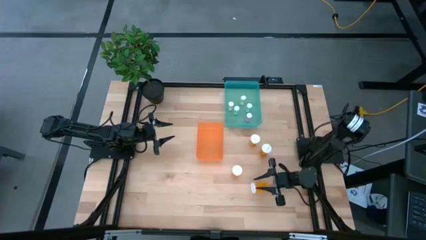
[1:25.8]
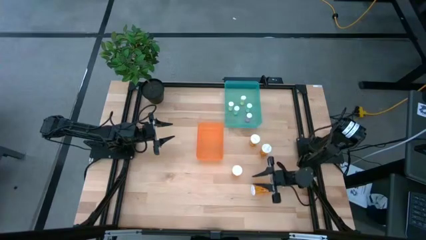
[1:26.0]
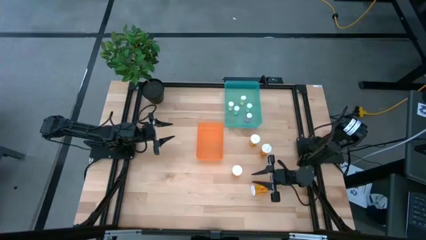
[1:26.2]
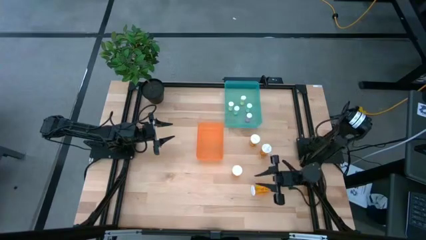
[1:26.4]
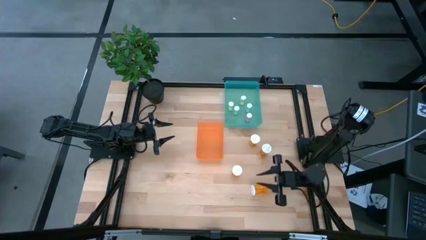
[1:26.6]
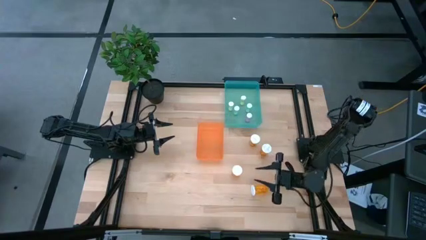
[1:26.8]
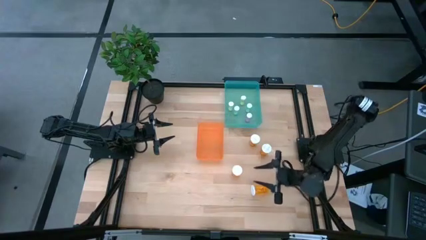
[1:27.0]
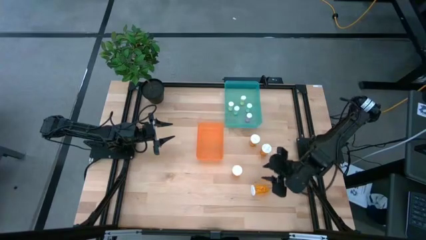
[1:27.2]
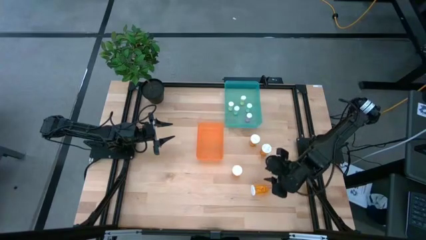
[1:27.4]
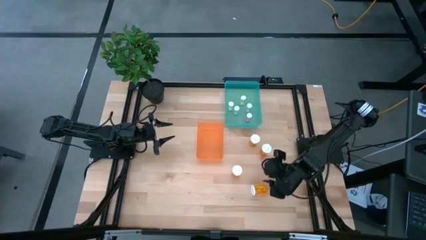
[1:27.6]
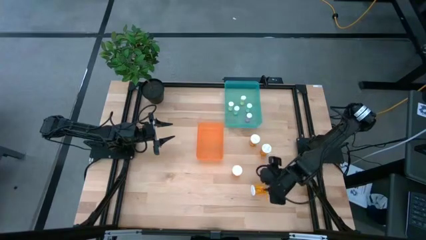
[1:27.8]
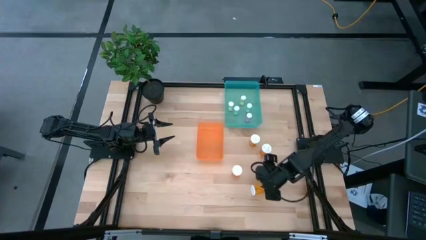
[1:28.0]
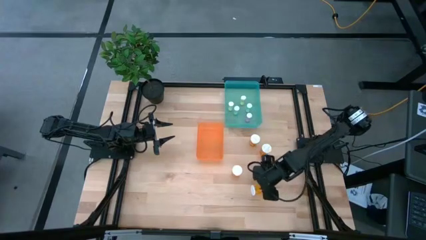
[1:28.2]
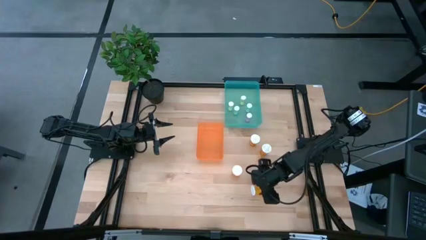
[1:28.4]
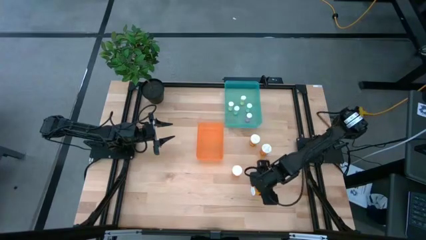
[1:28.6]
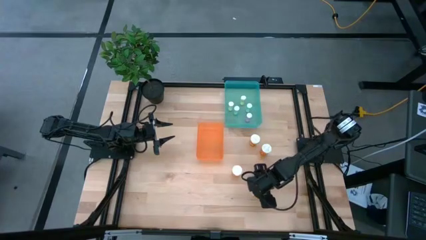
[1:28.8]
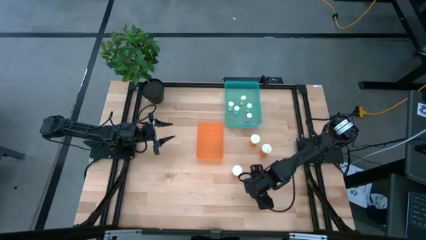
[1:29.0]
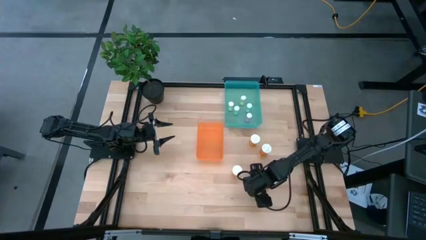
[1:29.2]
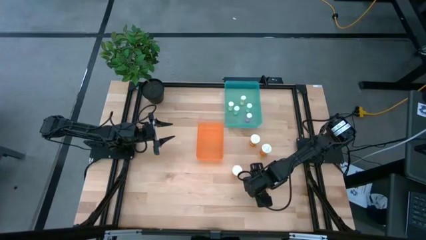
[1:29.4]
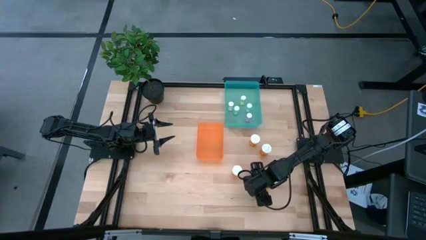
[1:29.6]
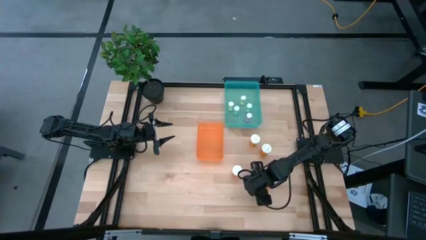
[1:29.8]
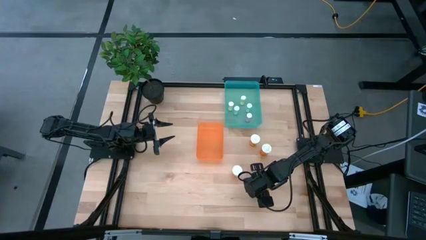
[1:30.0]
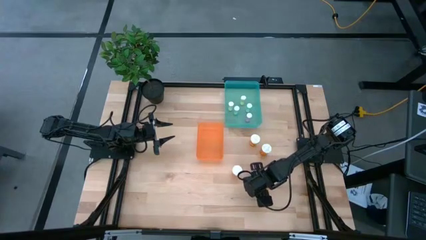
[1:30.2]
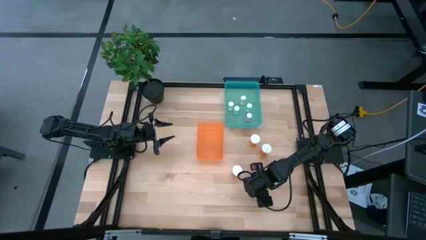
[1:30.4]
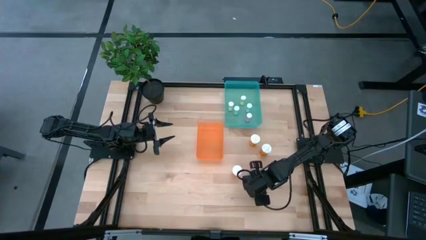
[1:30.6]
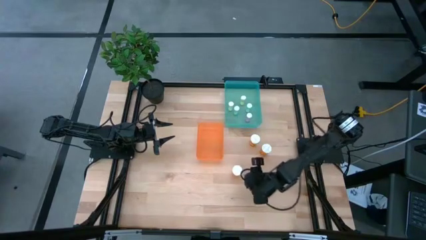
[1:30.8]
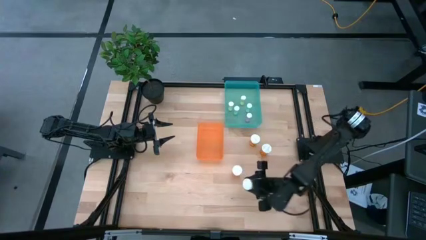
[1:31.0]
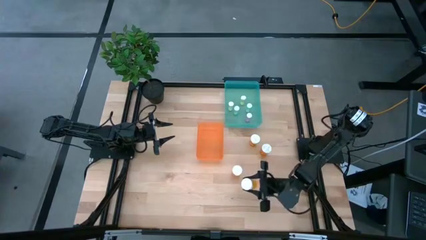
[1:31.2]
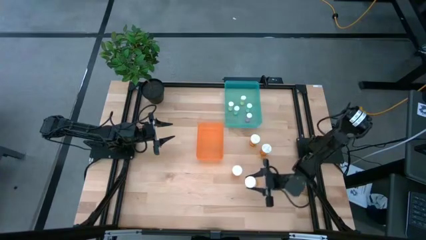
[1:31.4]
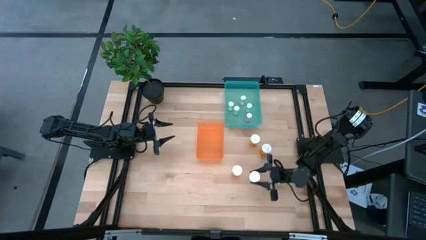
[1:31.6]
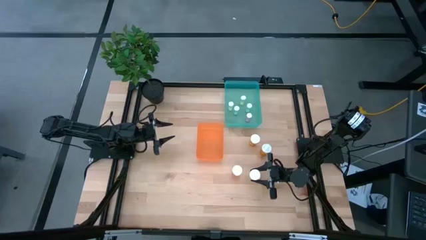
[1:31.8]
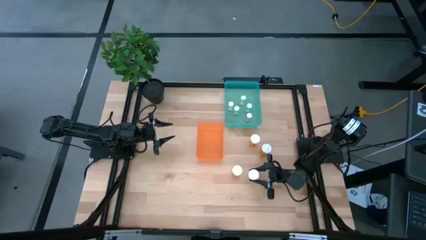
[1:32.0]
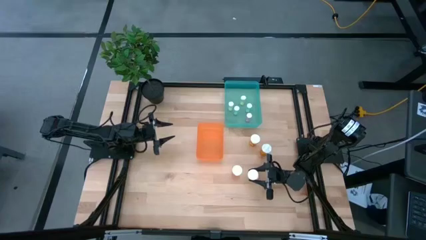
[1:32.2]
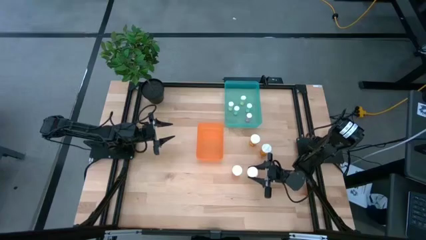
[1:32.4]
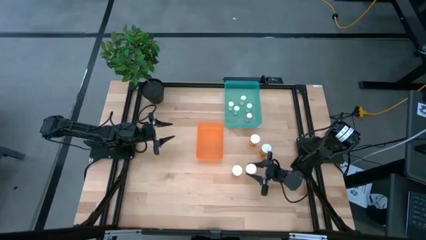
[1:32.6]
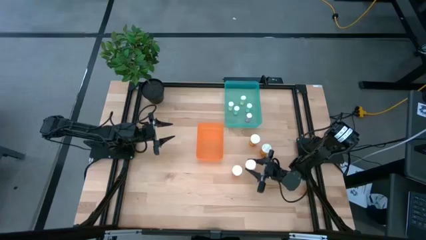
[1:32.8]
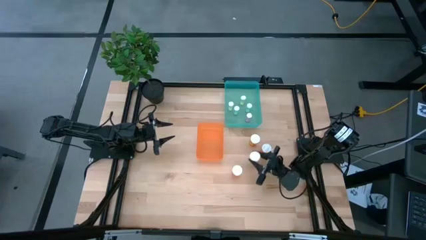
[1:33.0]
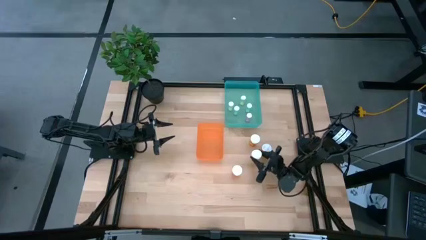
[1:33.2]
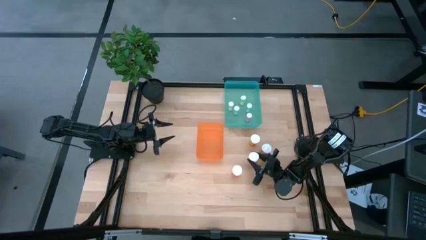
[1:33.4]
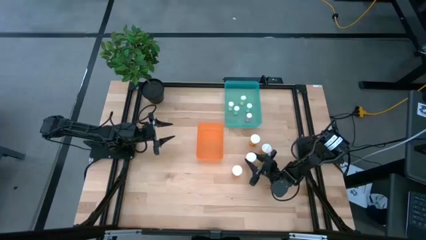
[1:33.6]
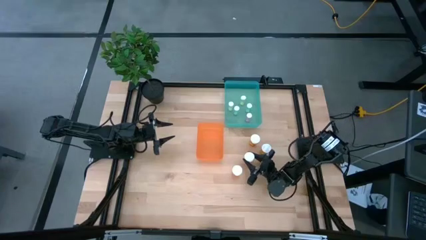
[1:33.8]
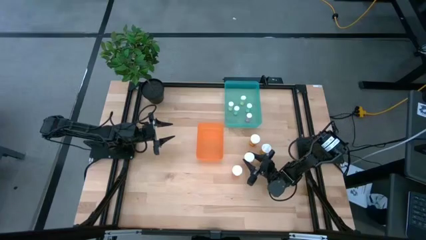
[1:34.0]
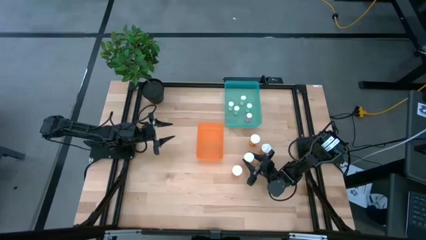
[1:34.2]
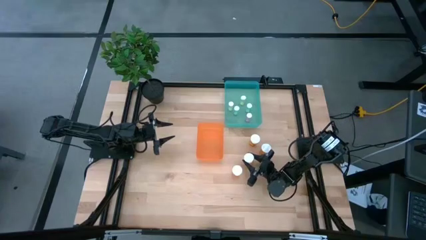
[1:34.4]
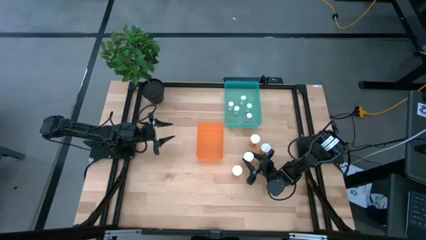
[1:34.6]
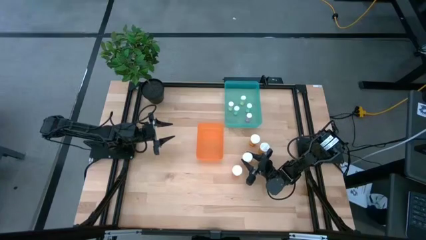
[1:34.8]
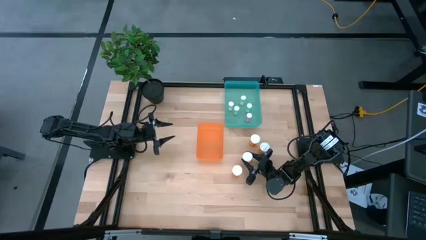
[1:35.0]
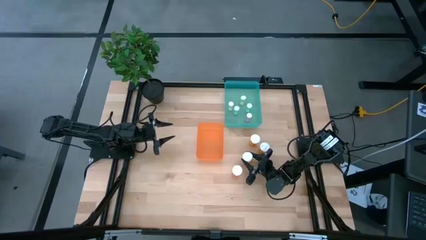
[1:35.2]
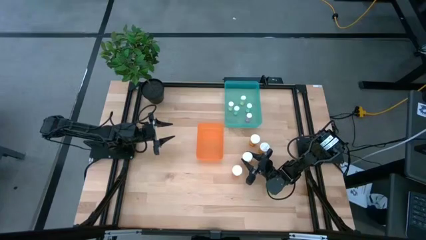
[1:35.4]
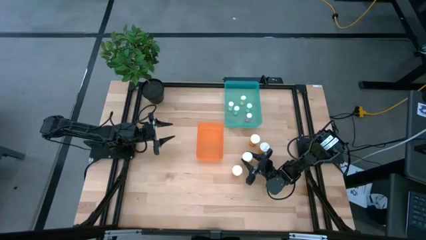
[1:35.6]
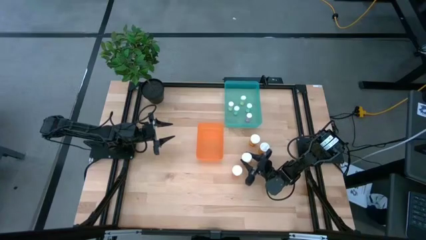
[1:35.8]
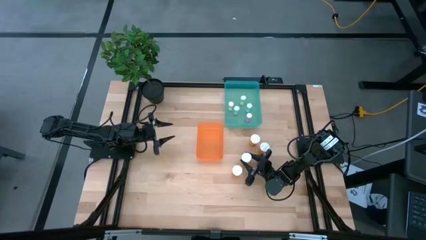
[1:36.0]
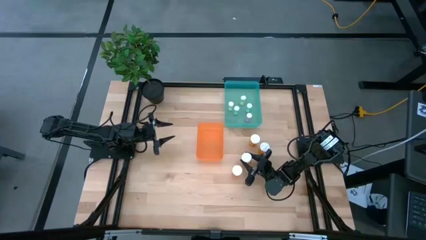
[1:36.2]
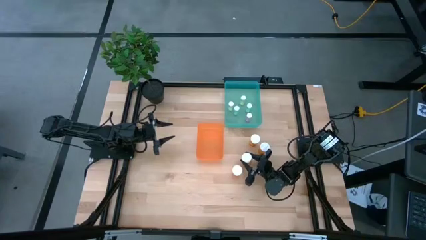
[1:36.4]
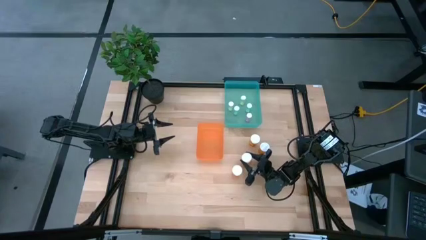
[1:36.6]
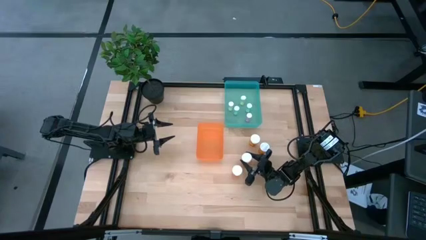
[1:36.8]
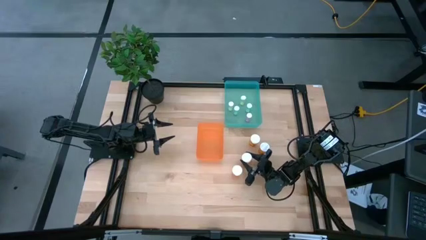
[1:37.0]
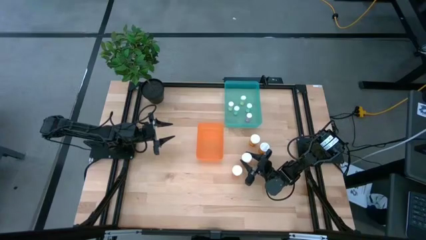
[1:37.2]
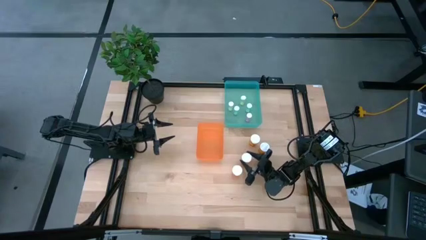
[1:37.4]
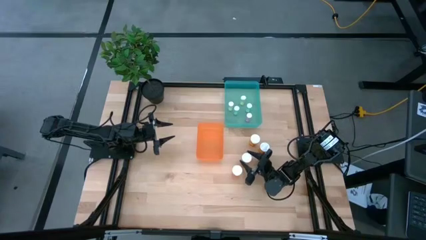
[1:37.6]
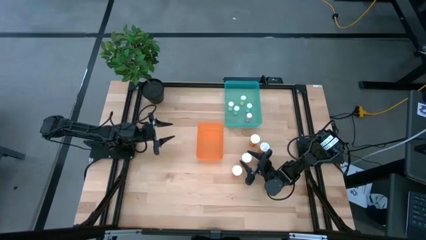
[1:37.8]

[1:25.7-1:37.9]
Task: Pick and place medicine bottles into bin by pill shape (circle, oval)
Remove the orange capsule bottle from the orange bin
